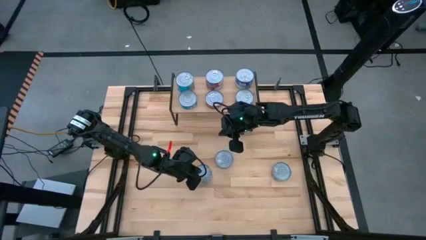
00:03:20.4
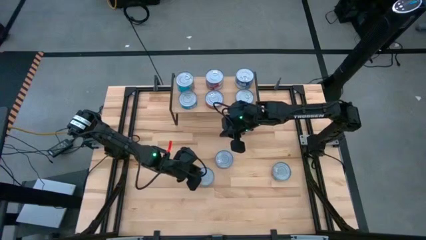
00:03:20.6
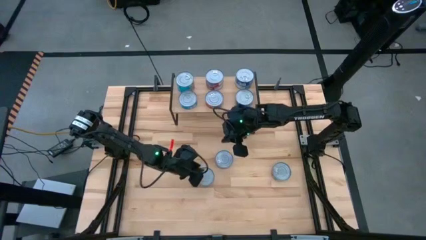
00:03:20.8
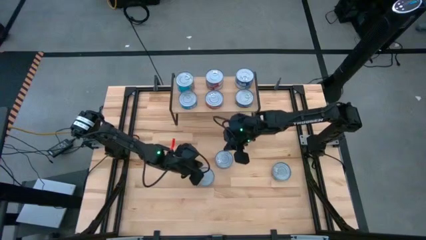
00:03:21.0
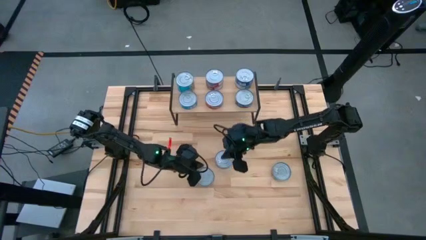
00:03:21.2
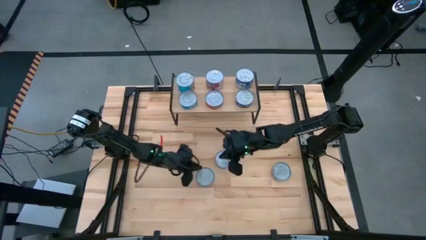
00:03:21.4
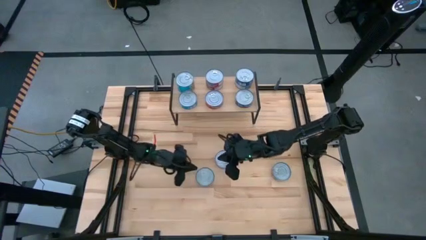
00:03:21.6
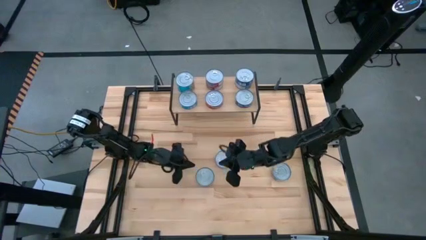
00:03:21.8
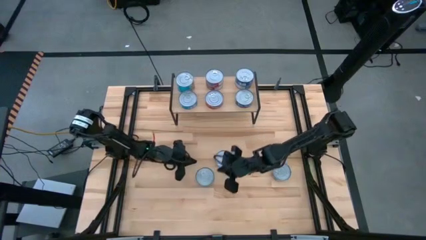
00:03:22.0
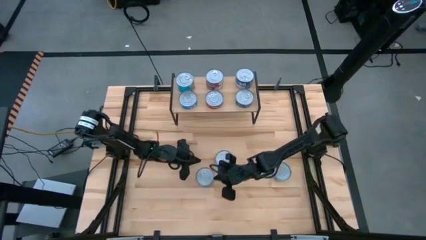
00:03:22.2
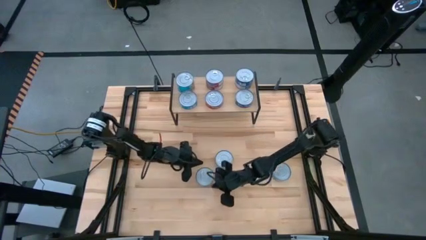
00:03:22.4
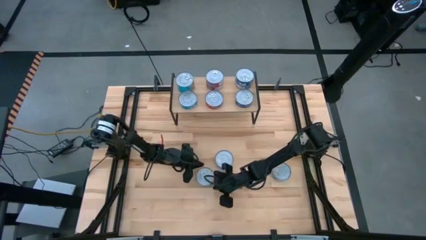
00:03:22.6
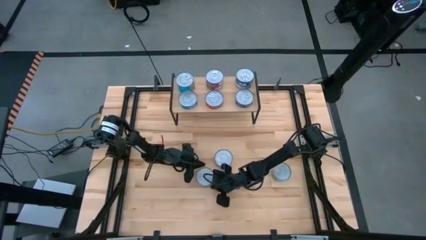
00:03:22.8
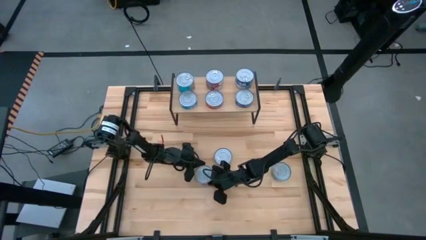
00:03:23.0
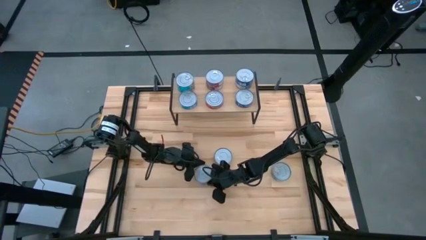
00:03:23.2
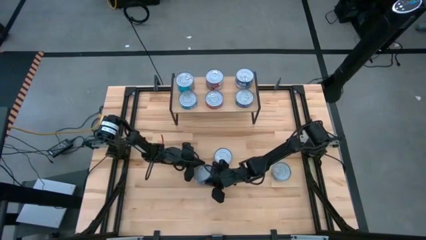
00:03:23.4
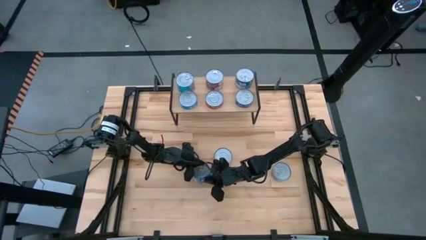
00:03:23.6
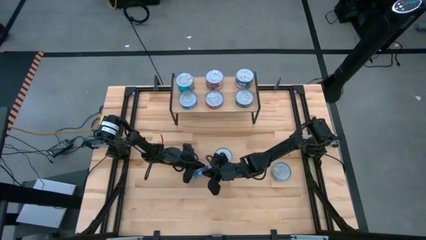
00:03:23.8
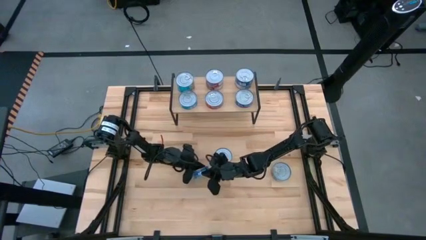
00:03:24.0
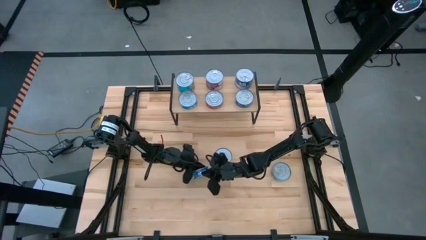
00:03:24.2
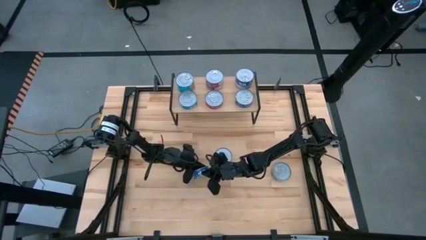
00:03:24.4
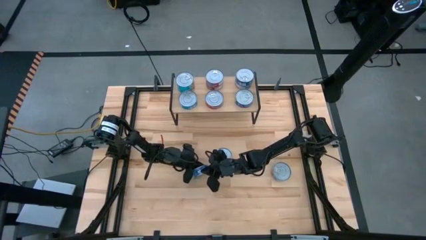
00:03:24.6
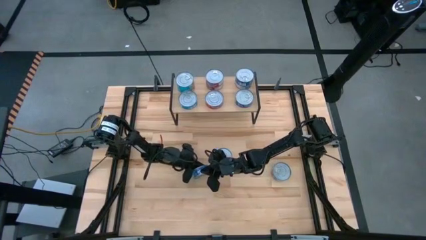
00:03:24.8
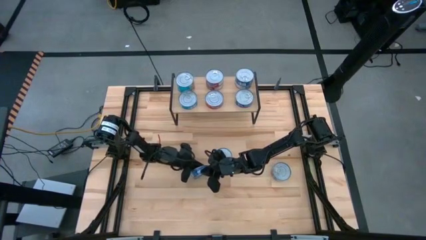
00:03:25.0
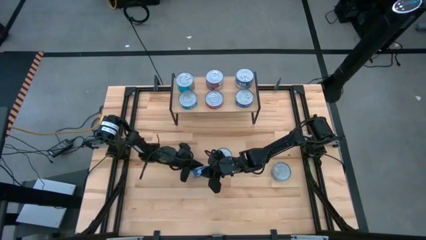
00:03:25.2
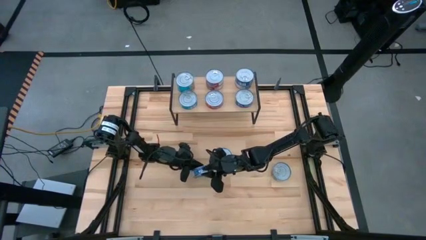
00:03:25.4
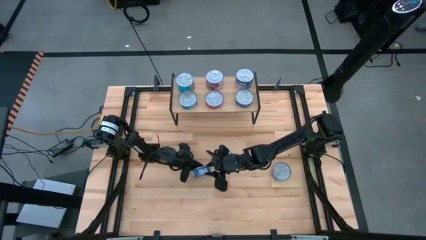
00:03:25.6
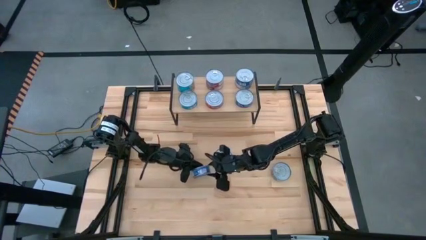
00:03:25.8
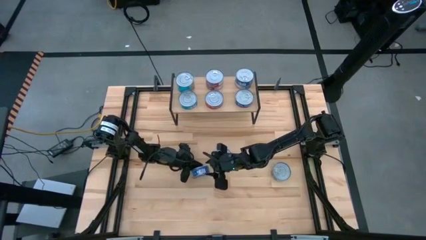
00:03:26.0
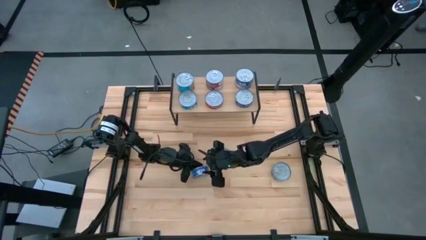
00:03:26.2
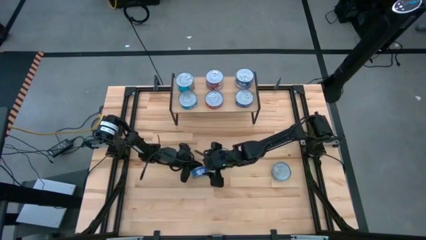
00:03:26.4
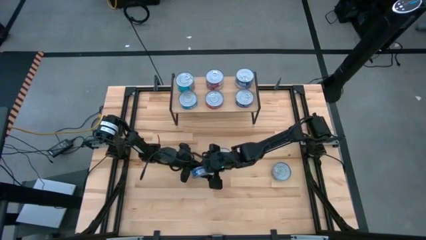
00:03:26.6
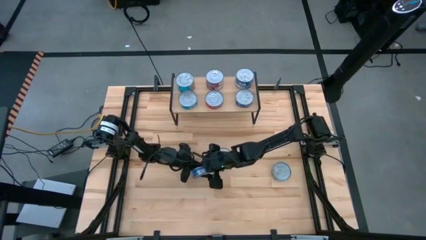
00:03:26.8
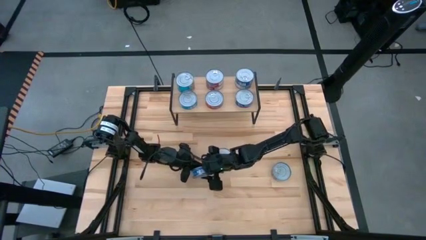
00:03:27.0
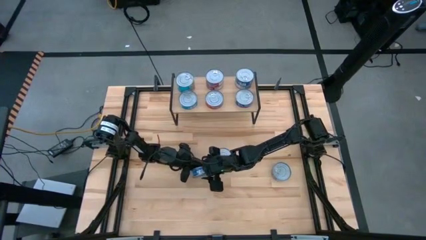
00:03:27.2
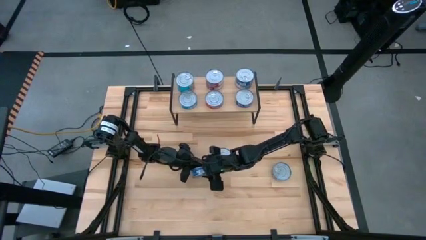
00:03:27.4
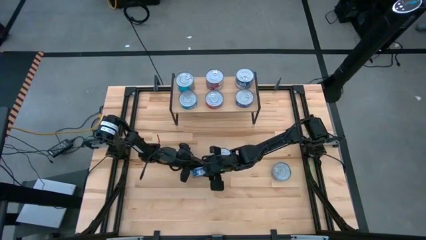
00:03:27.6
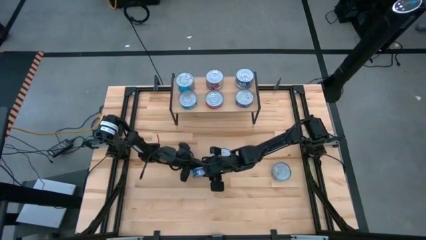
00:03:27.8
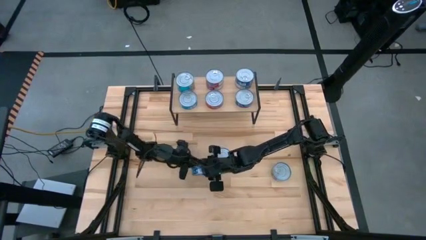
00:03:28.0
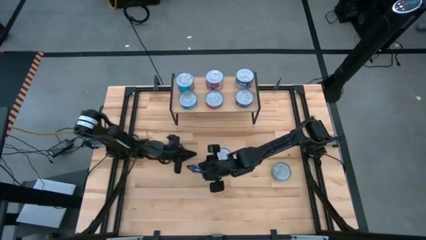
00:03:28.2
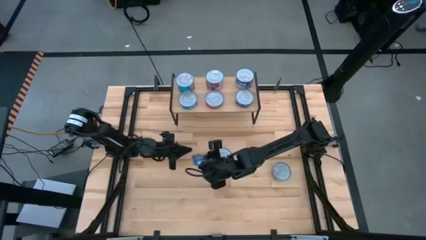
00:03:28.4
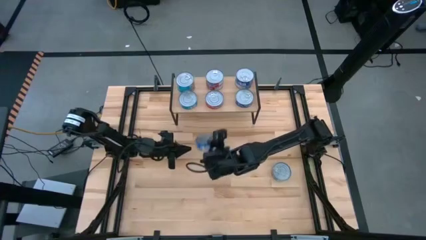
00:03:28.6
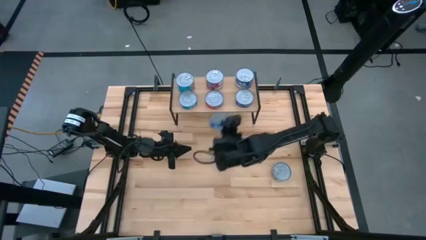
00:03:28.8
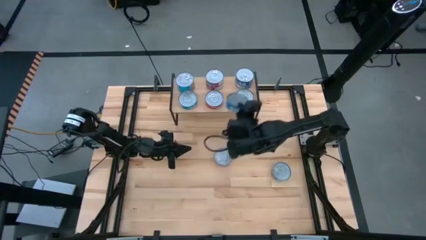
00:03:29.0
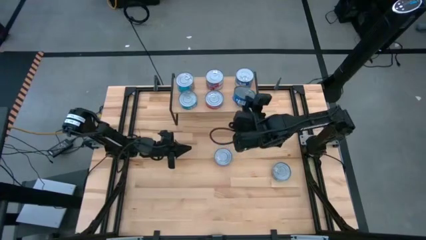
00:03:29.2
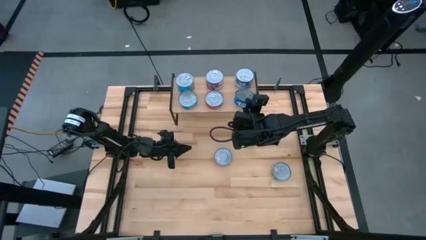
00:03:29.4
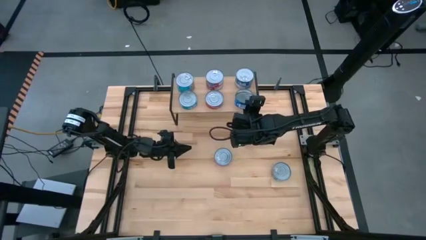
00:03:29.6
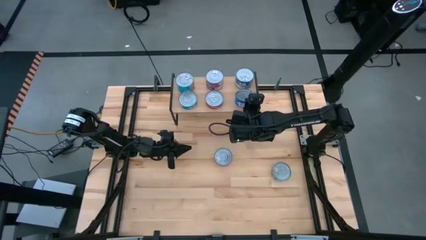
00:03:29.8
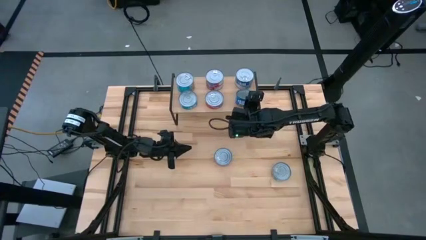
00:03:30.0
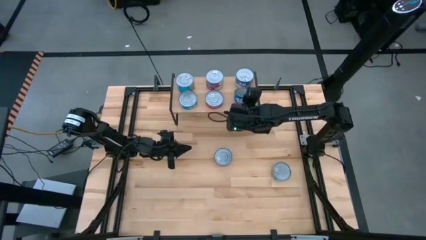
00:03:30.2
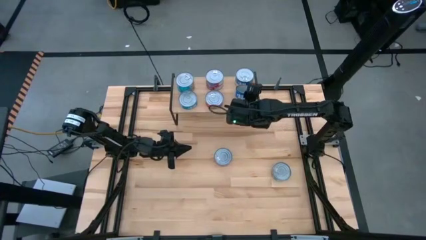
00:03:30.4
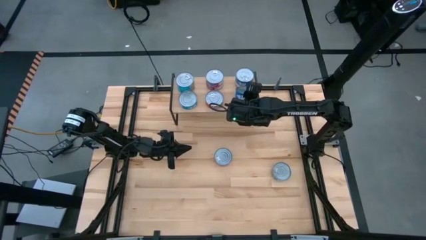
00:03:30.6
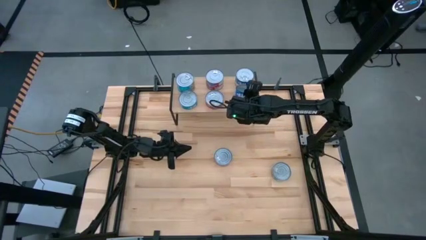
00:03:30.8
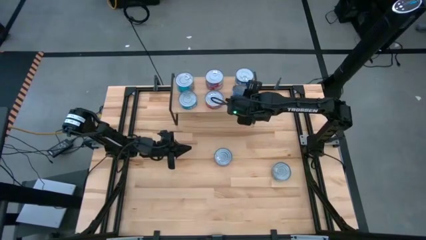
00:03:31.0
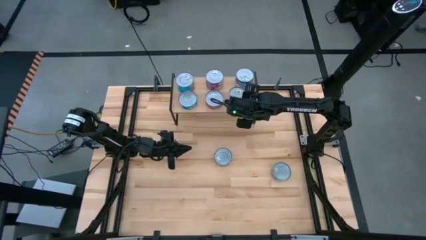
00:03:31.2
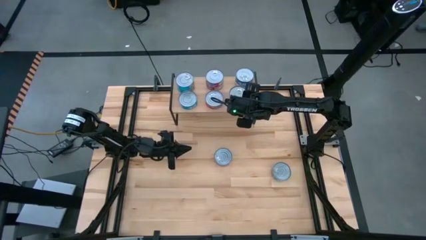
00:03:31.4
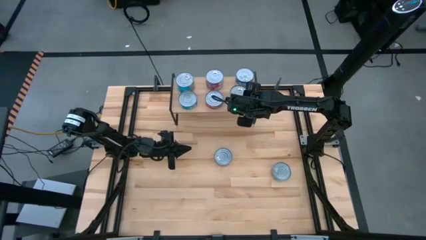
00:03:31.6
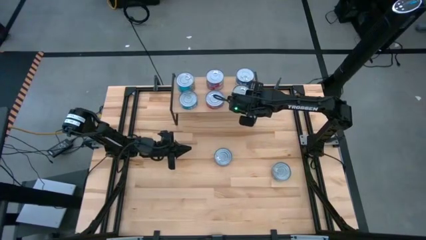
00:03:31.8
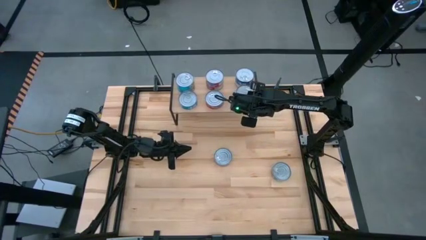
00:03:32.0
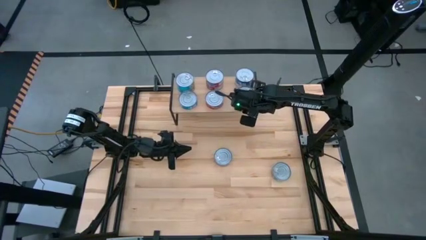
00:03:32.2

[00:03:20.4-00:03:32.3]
Task: Stack canned seafood by type on shelf
Stack the blue tuna can on top of the other blue tuna can on the shelf

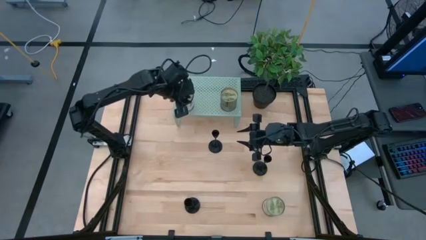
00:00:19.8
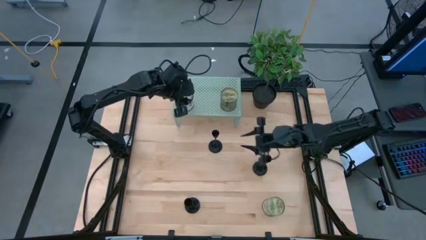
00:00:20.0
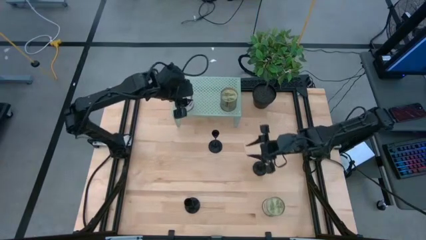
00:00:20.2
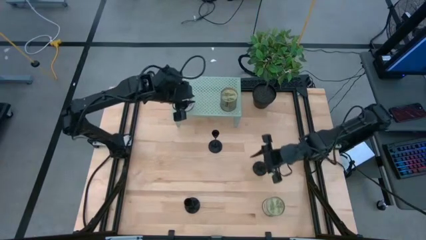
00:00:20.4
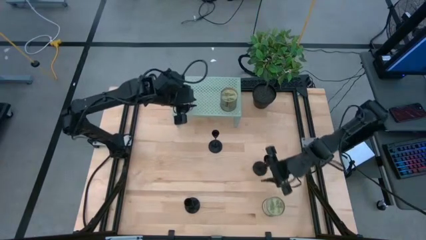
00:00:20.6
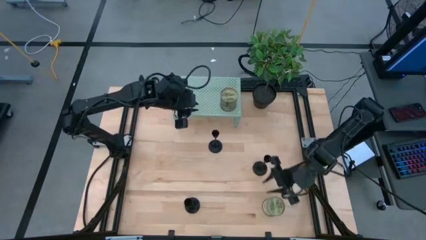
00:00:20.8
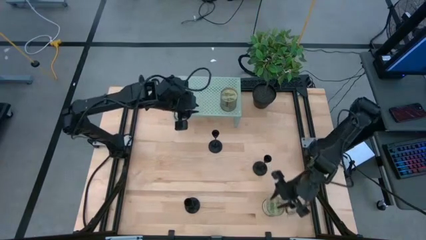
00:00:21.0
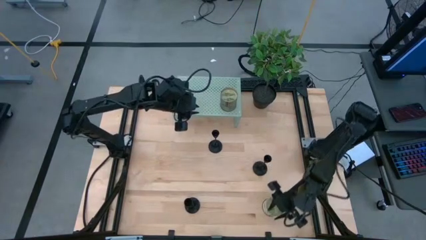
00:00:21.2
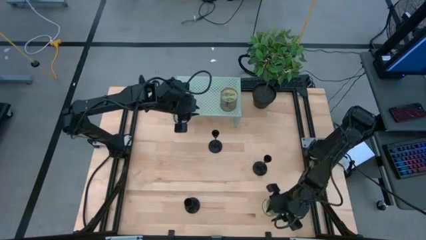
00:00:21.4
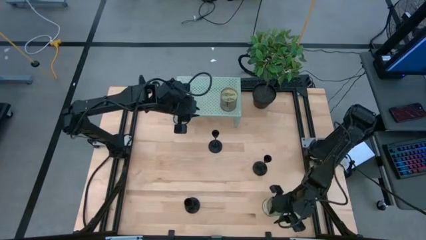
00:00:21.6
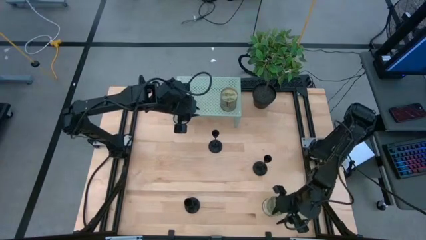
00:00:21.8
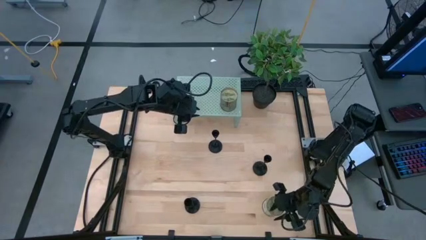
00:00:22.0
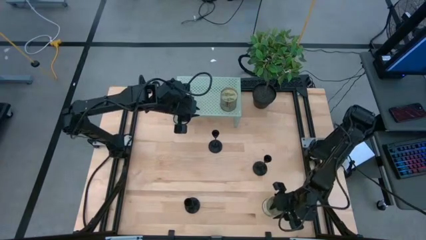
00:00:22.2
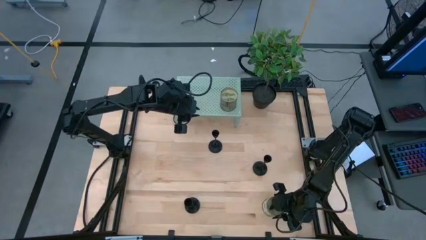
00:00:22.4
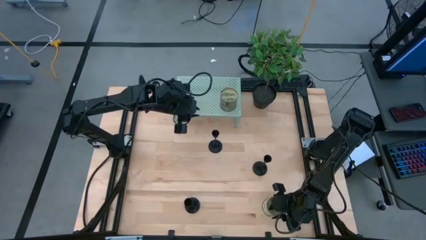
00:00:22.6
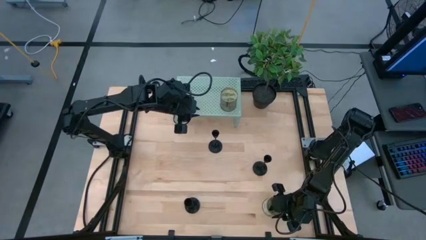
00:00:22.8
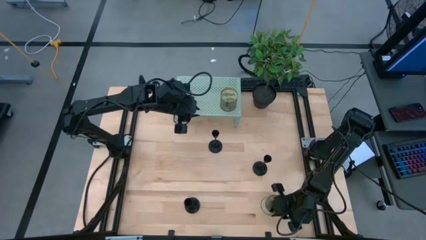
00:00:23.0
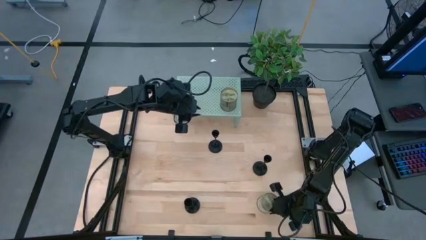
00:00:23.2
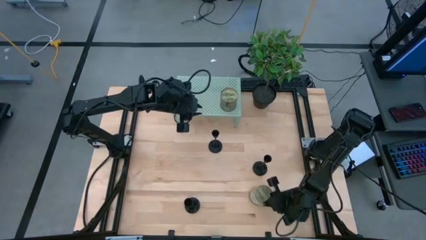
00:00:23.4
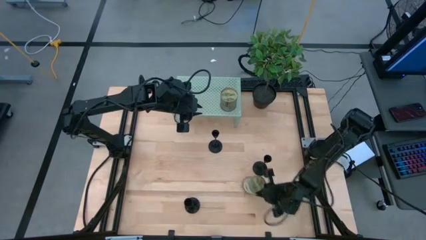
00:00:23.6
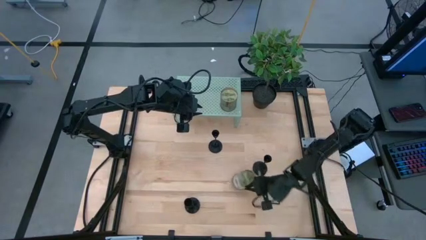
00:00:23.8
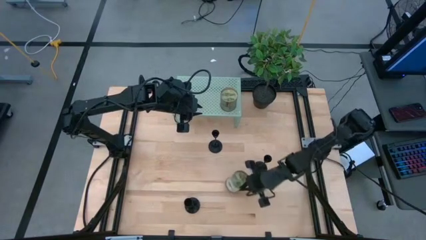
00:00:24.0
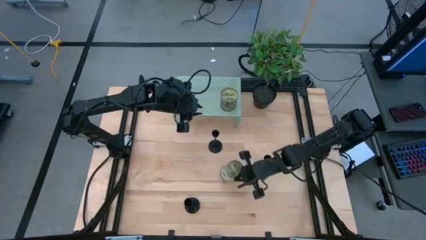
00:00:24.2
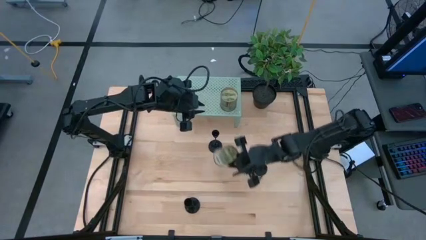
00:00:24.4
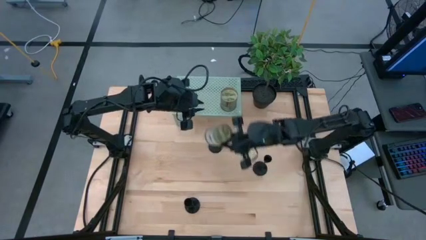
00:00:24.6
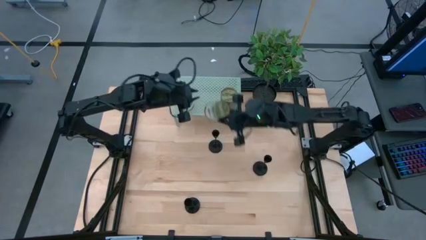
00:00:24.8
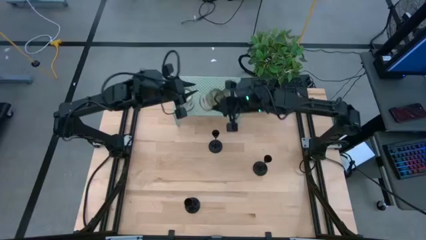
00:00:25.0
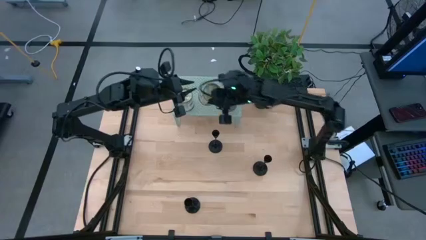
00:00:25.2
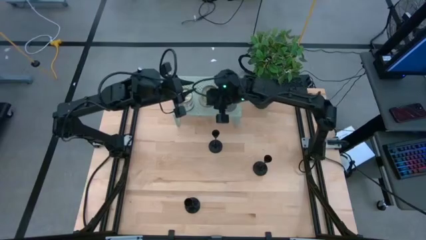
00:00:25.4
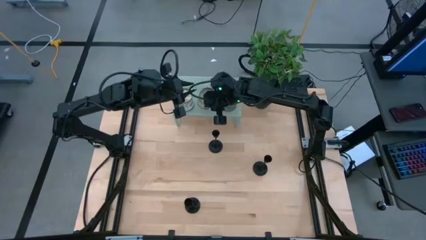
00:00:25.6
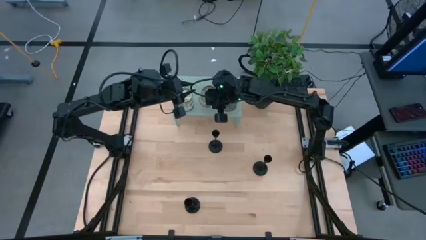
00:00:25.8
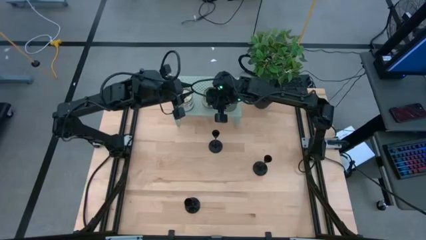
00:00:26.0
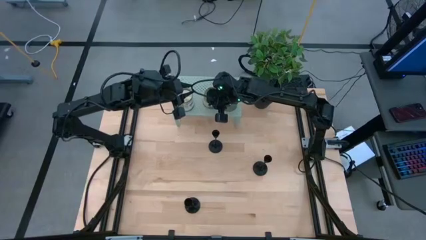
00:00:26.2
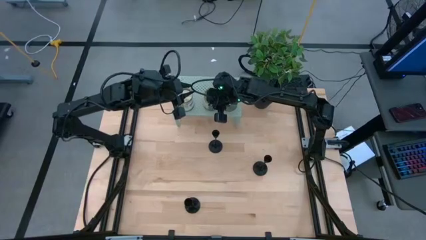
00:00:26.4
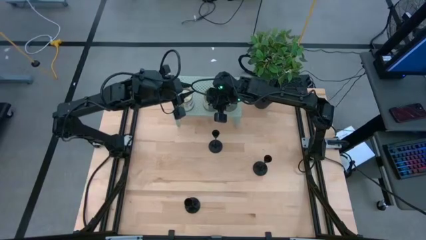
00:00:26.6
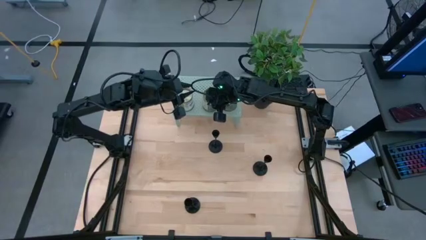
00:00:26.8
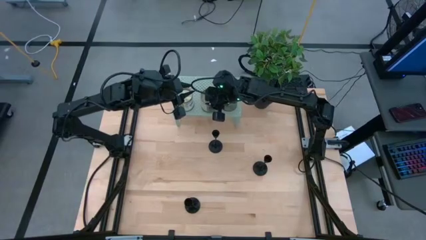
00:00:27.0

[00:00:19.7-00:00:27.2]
Task: Pick & Place candle stick holders
Put the jar candle on the shelf
